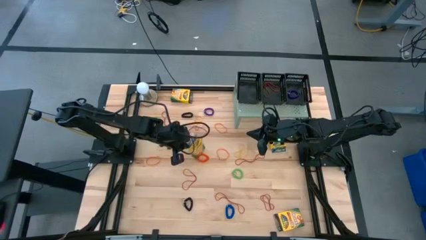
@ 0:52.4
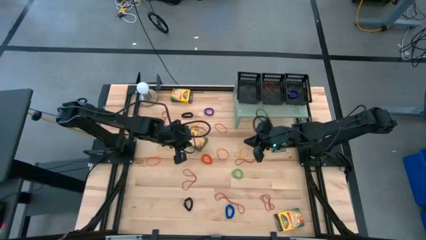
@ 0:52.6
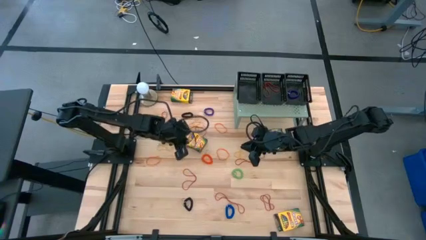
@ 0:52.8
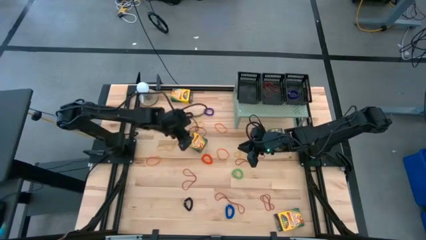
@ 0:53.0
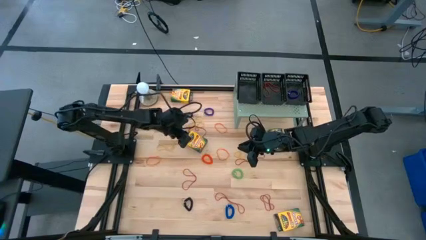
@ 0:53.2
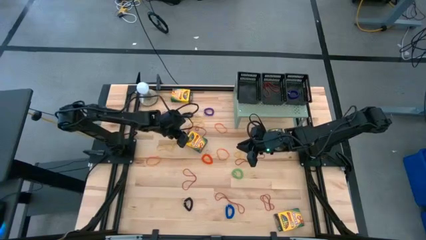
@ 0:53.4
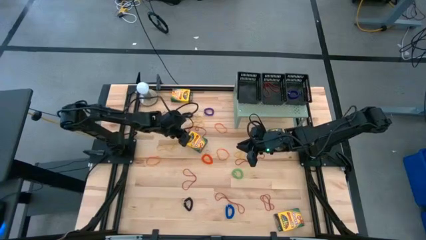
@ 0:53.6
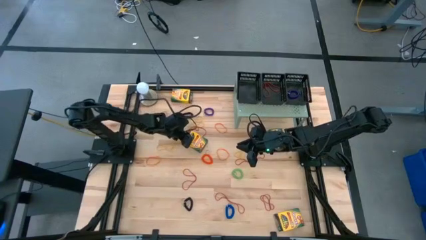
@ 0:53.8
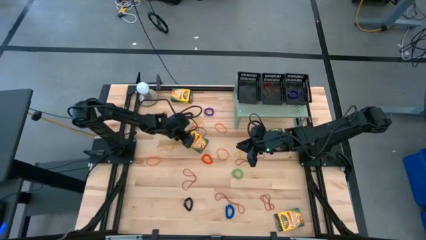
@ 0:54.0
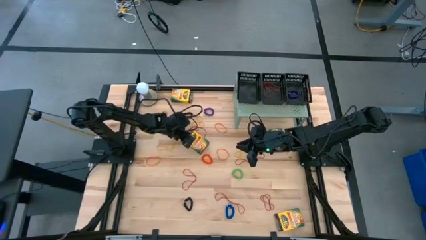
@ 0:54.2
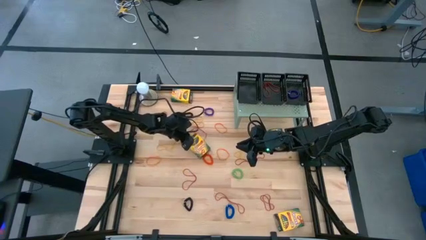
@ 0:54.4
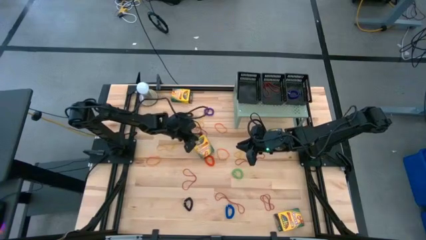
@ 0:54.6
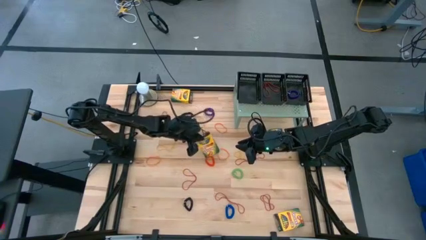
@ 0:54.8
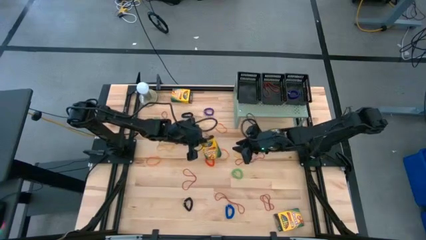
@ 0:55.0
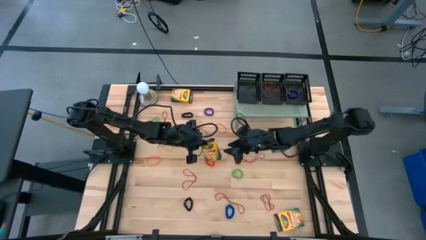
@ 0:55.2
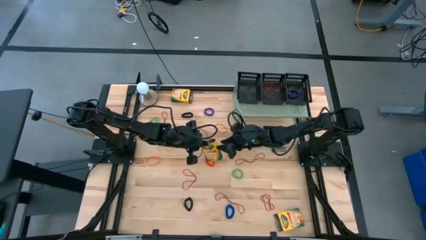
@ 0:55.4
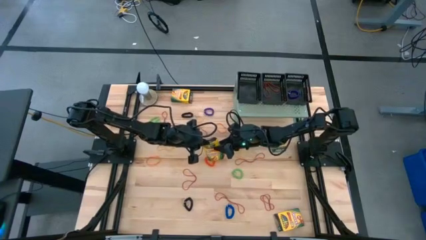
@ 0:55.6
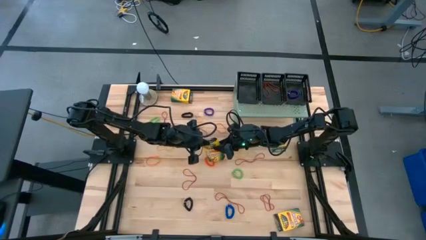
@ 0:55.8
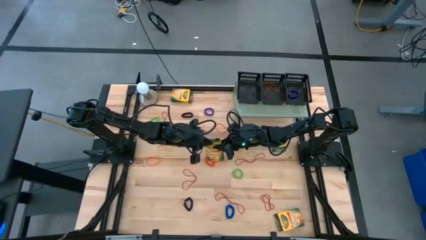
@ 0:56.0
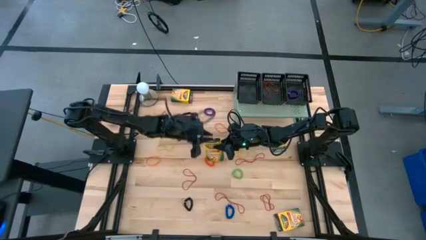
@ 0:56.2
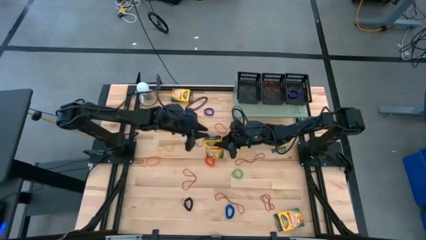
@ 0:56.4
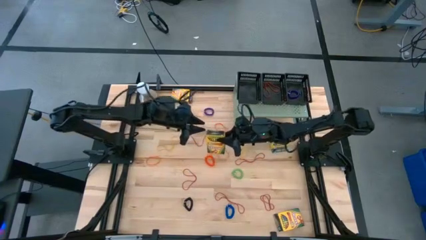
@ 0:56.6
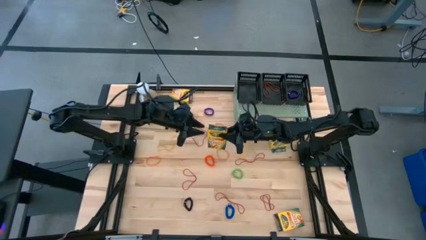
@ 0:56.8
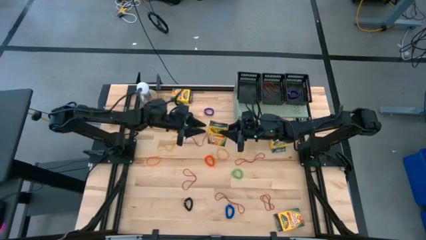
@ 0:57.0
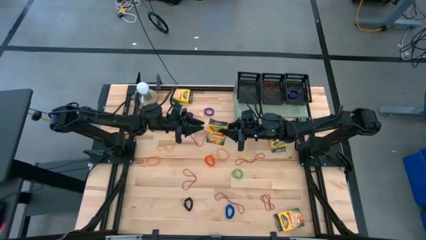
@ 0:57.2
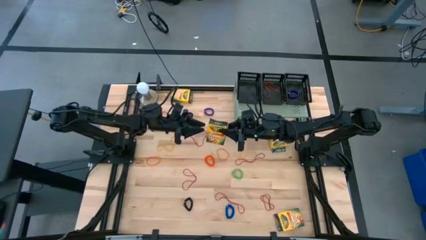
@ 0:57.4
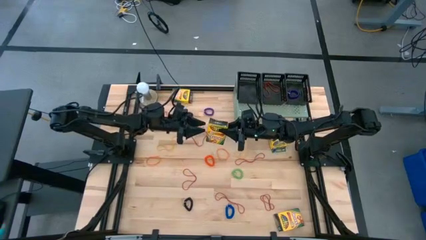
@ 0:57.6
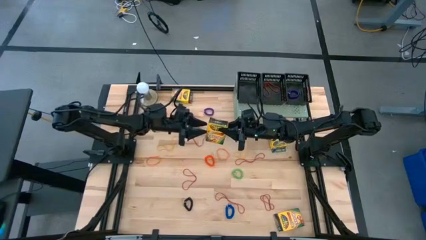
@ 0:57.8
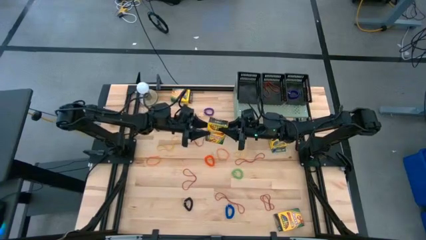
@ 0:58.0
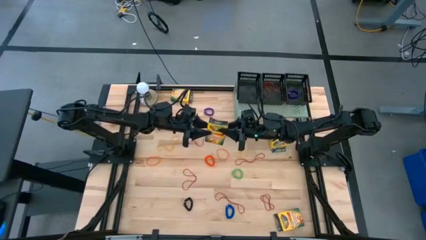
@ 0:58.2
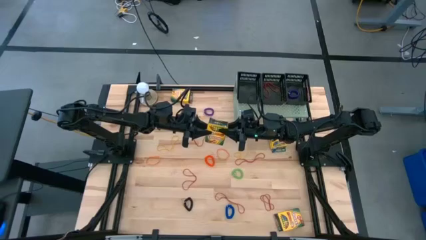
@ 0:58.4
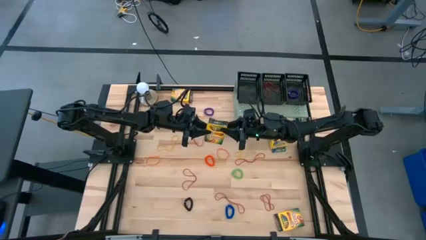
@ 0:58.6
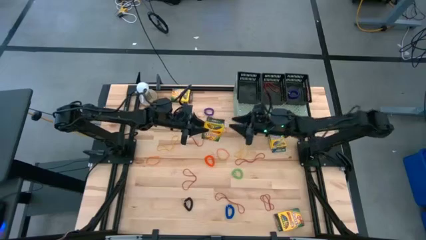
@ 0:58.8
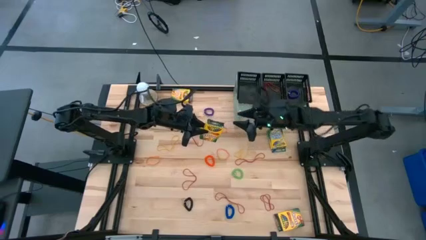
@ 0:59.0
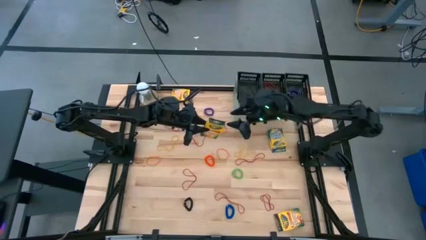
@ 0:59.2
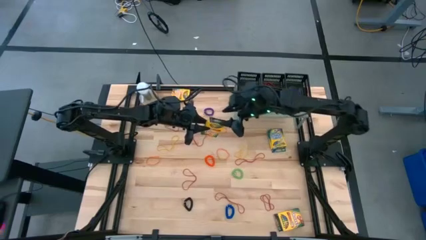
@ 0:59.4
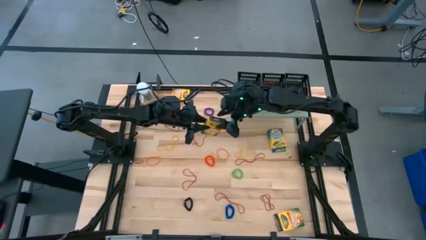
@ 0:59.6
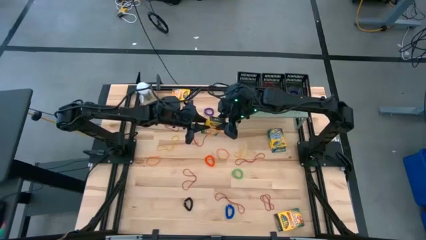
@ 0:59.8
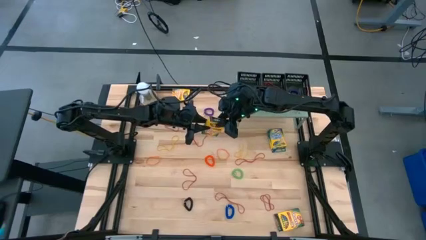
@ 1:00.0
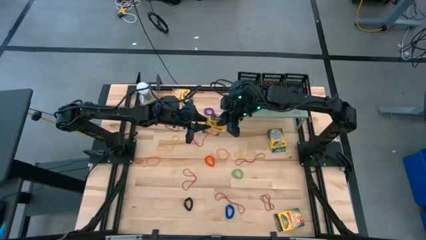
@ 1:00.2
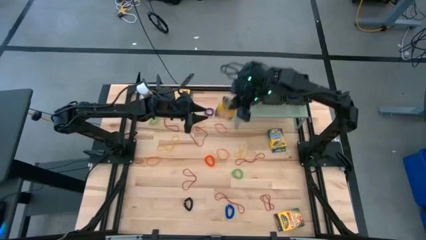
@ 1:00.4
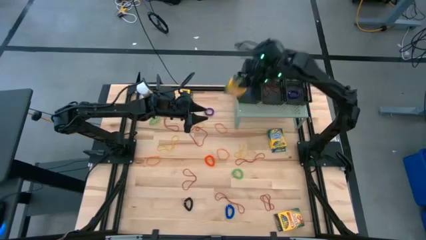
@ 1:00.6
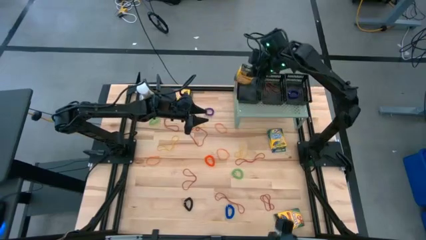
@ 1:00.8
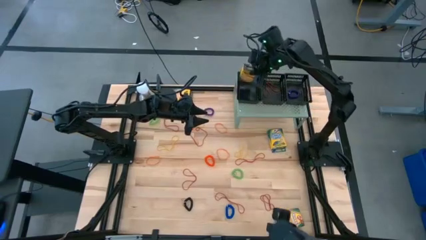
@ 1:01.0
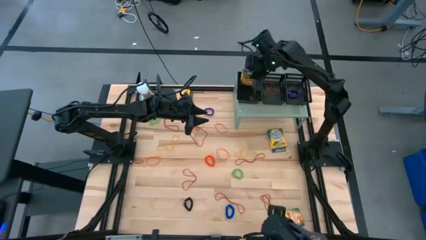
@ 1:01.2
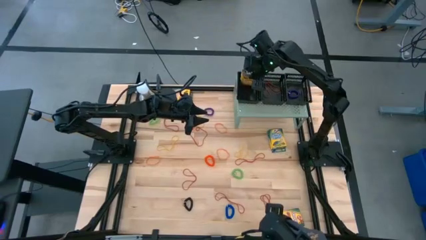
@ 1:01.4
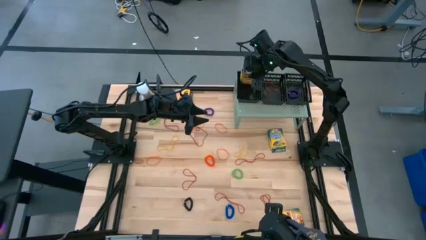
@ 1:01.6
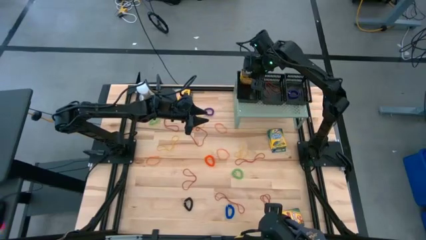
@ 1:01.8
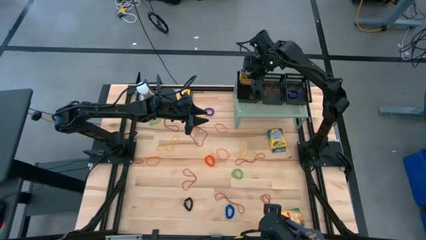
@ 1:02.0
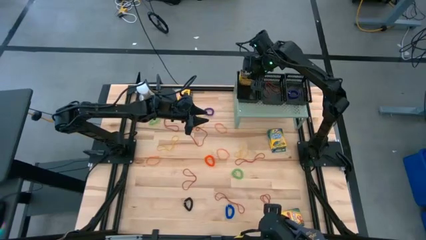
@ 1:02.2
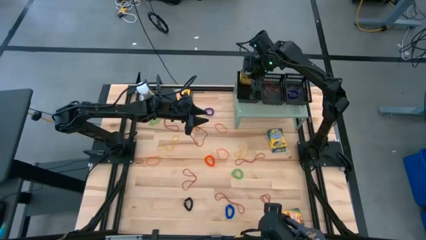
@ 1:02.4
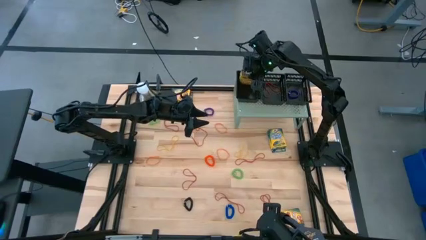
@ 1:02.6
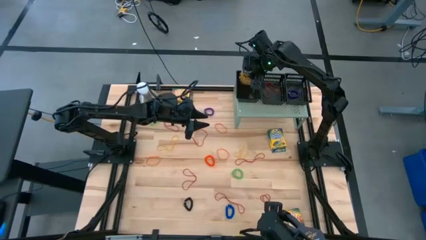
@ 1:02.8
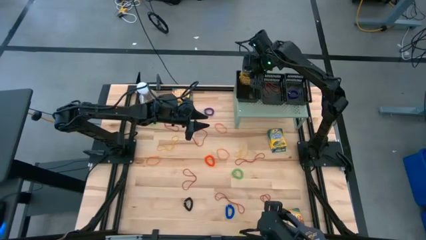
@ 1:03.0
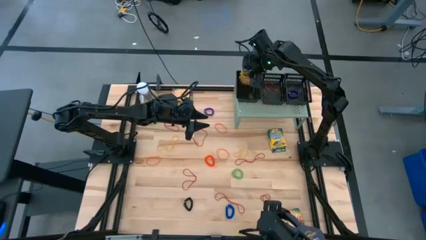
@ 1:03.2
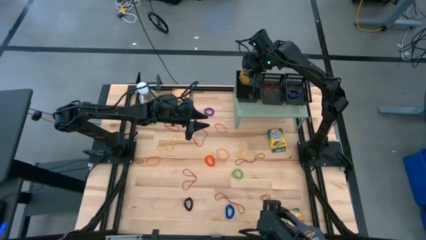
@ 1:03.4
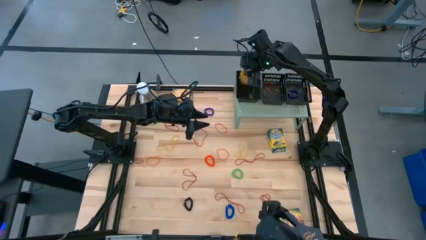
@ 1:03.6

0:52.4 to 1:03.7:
Task: Pick & Place Office Desk Supplies
Put the yellow crayon box into the left black basket on the shelf

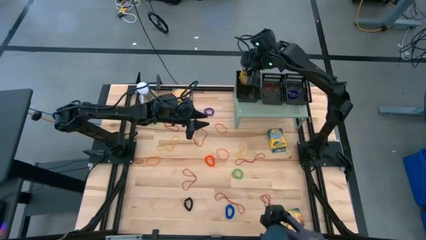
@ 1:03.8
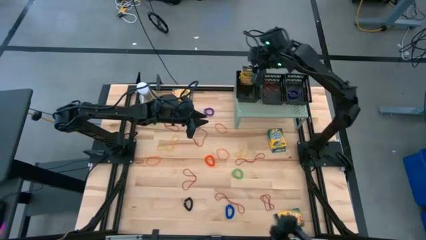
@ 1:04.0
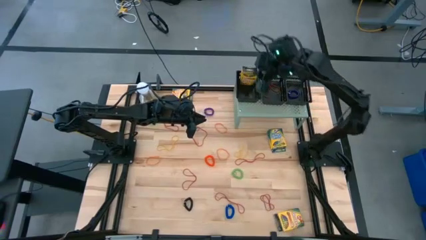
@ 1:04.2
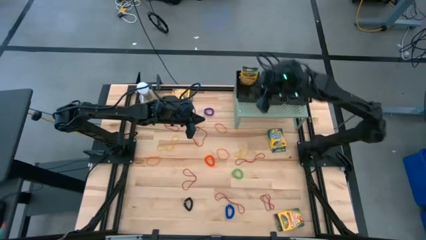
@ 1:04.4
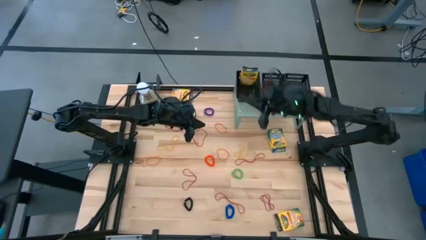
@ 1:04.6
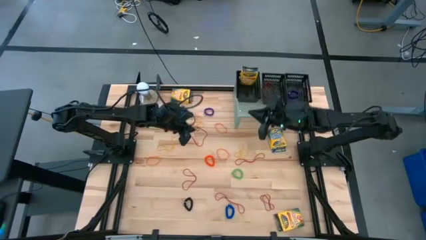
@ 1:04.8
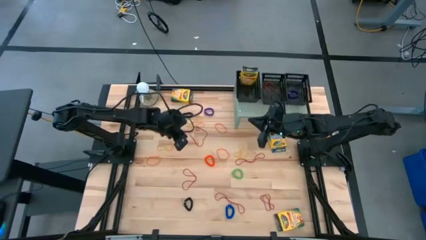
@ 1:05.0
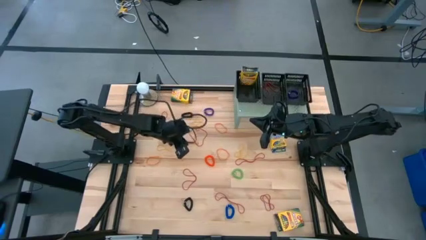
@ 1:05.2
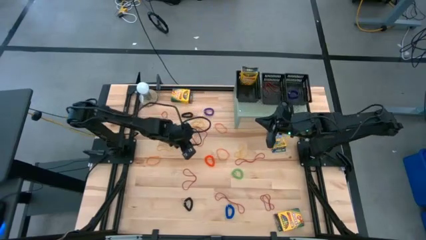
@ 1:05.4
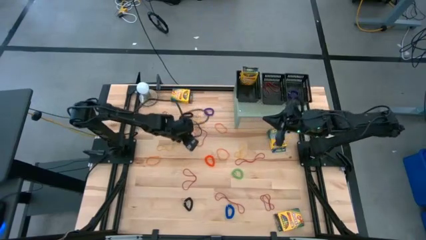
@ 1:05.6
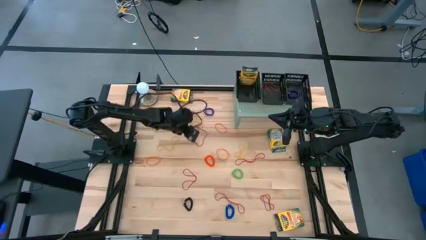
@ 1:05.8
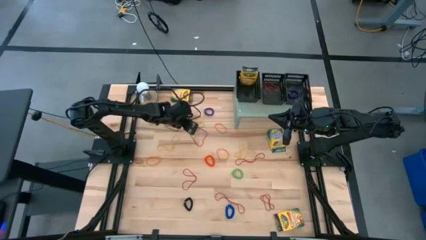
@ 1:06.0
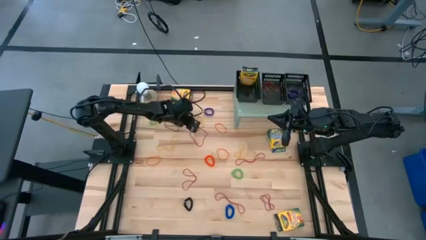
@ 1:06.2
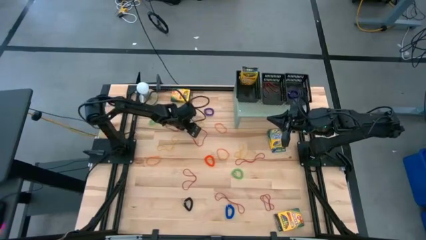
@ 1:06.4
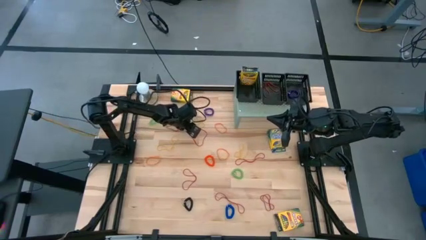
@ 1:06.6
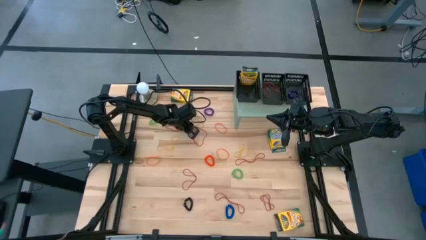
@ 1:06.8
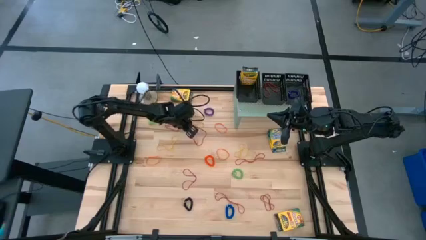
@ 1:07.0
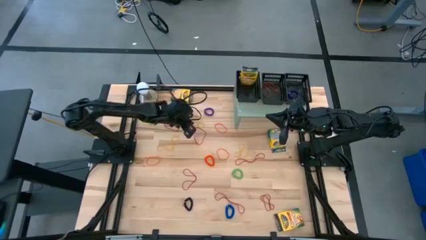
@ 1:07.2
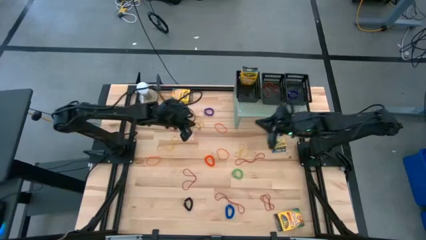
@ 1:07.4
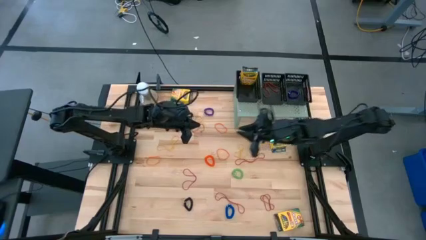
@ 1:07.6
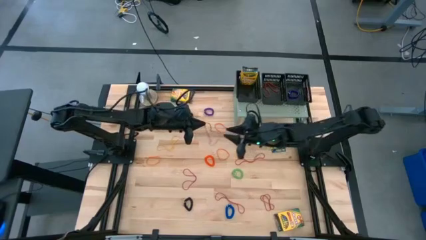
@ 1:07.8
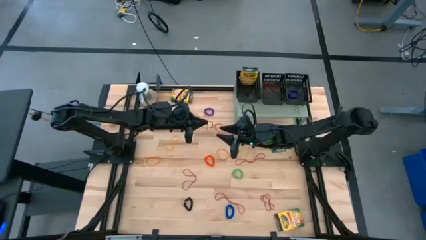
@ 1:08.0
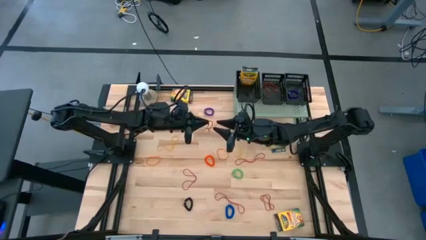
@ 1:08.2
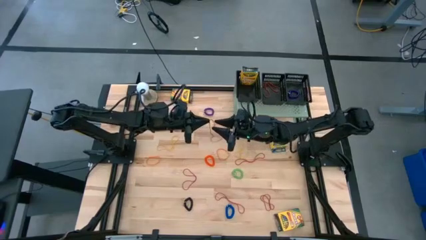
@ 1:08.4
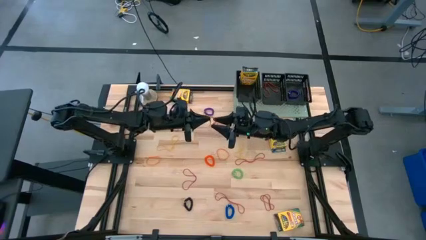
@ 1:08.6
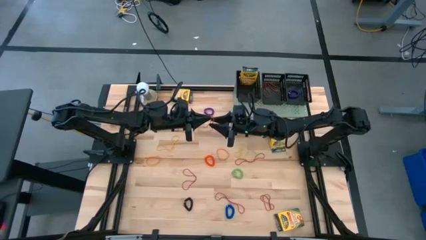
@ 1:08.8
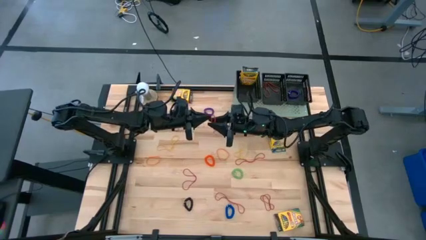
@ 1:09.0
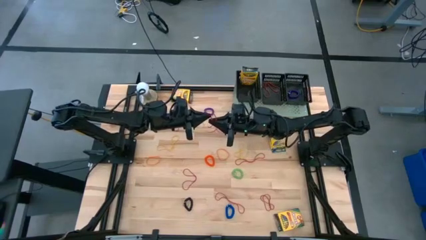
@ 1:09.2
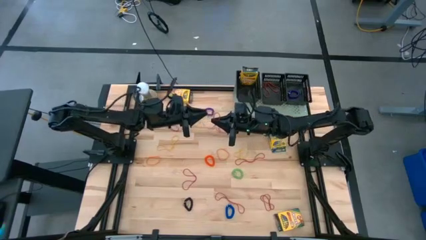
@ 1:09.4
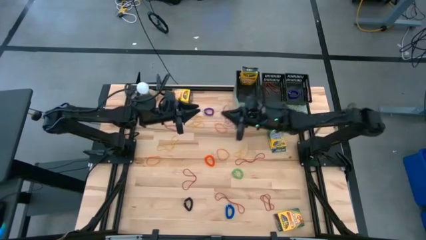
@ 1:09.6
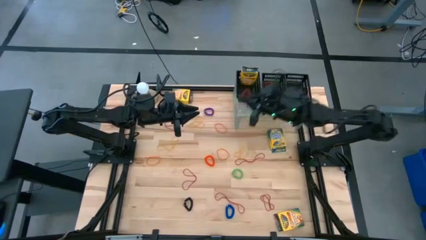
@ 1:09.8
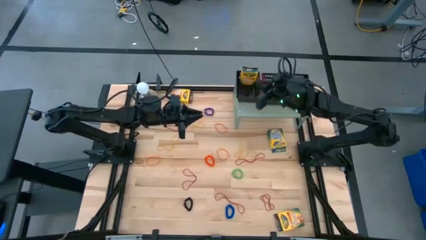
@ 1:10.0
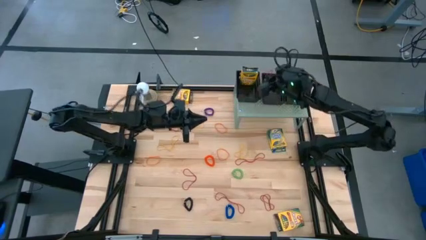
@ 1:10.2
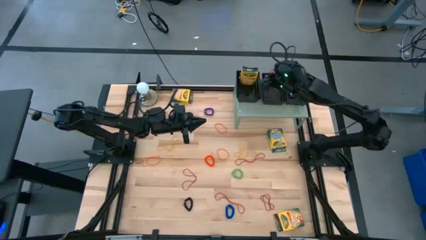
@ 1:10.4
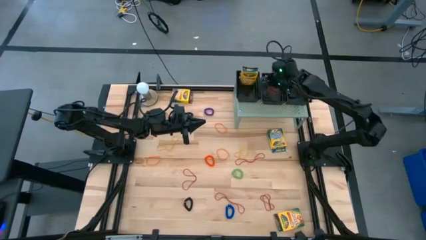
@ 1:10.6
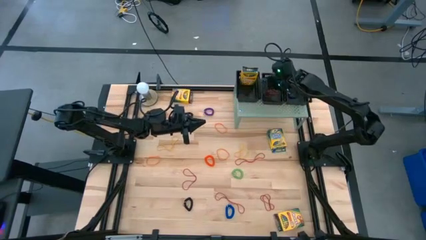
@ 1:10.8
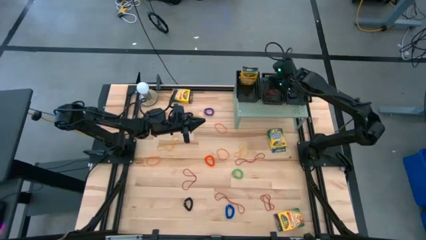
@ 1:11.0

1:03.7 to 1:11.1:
Put the red rubber band into the middle black basket on the shelf
